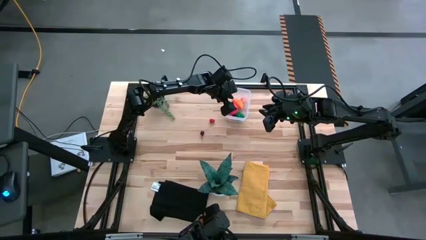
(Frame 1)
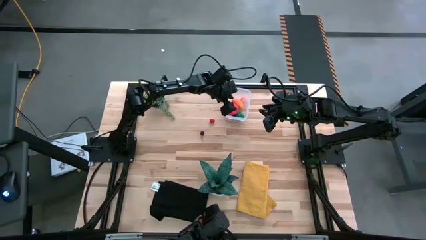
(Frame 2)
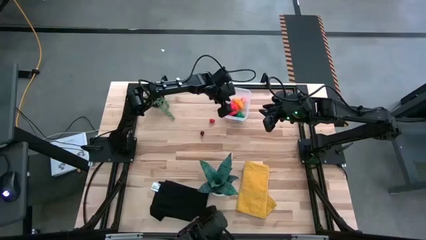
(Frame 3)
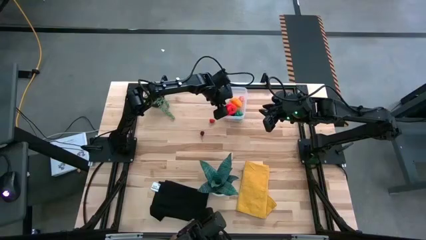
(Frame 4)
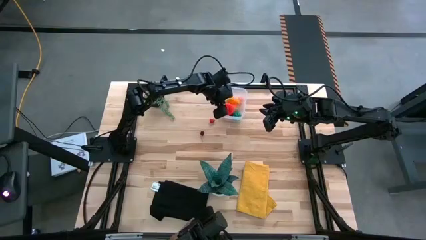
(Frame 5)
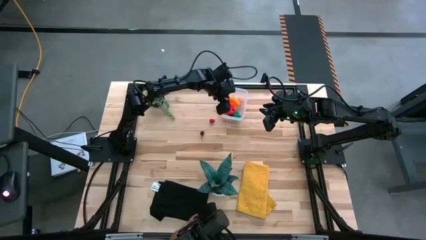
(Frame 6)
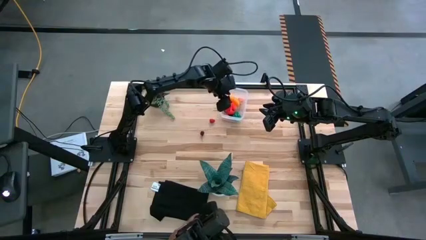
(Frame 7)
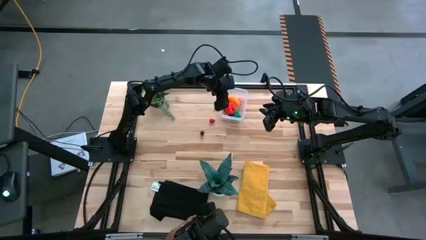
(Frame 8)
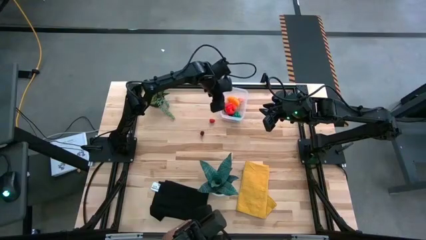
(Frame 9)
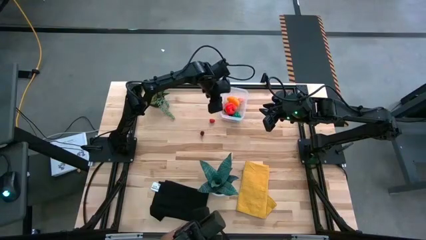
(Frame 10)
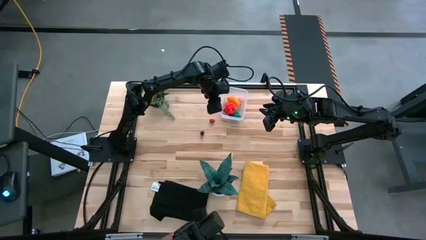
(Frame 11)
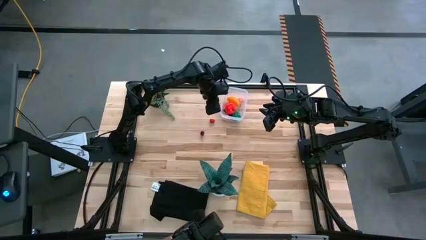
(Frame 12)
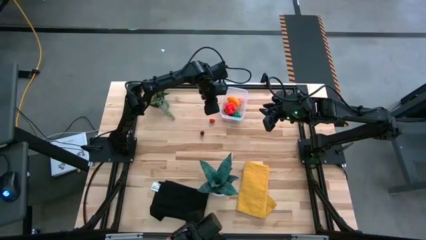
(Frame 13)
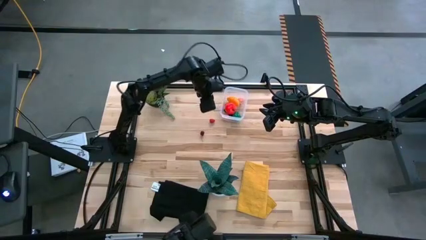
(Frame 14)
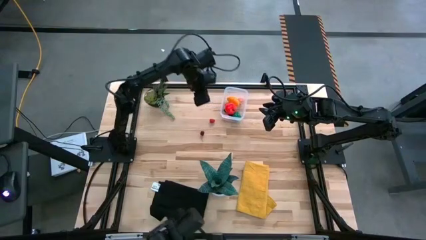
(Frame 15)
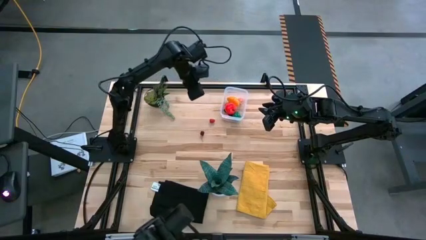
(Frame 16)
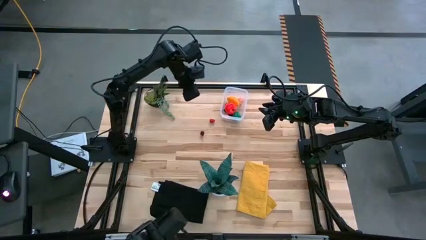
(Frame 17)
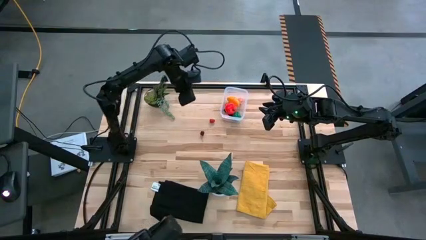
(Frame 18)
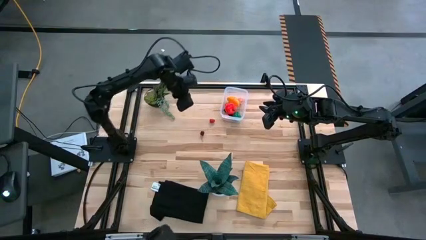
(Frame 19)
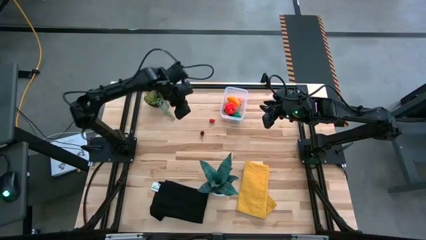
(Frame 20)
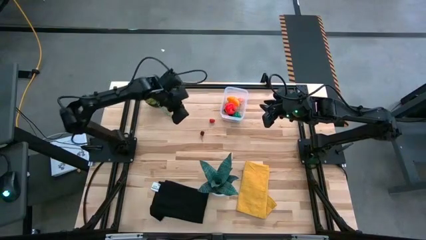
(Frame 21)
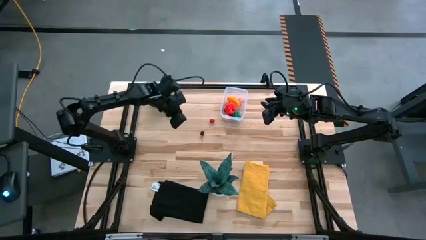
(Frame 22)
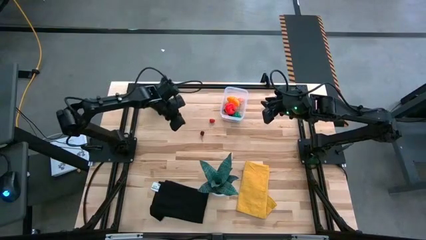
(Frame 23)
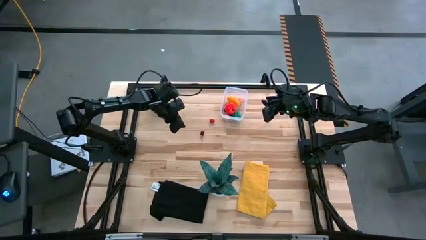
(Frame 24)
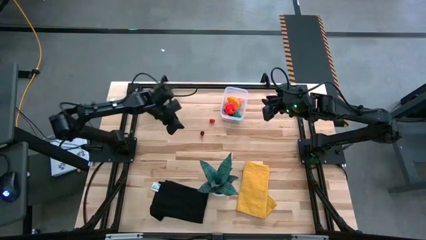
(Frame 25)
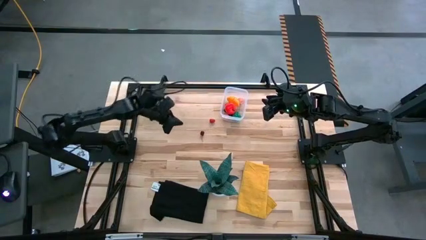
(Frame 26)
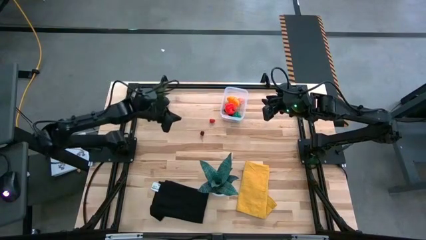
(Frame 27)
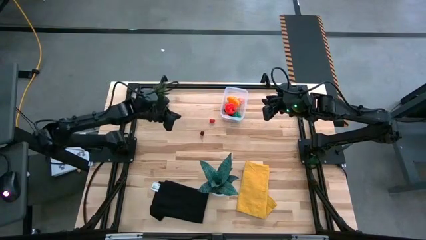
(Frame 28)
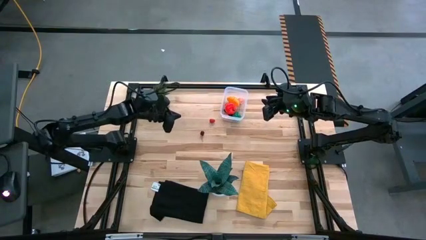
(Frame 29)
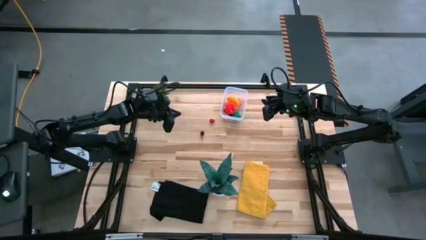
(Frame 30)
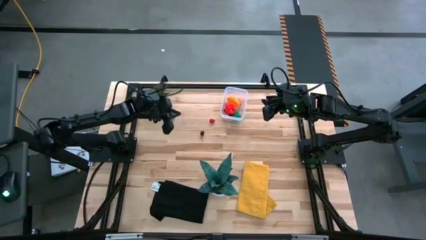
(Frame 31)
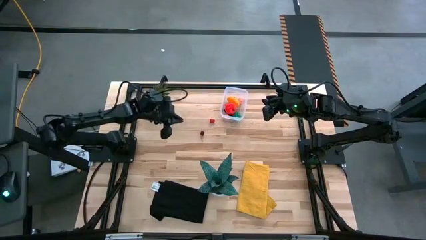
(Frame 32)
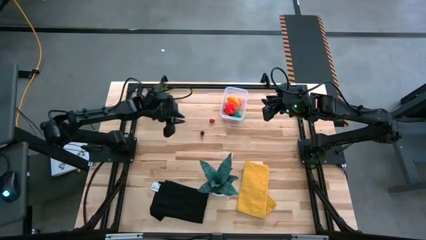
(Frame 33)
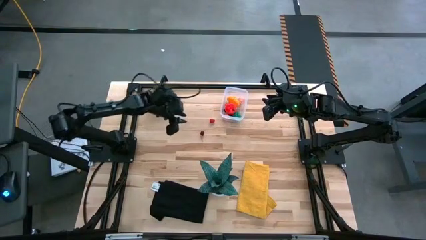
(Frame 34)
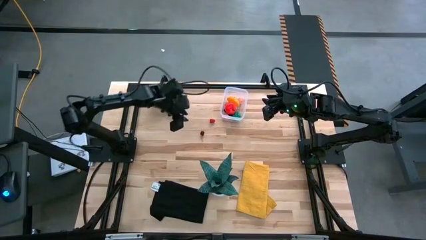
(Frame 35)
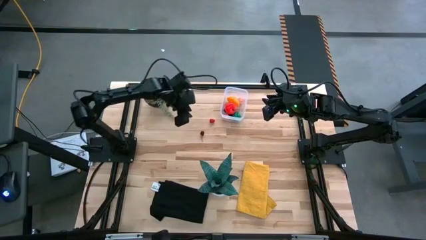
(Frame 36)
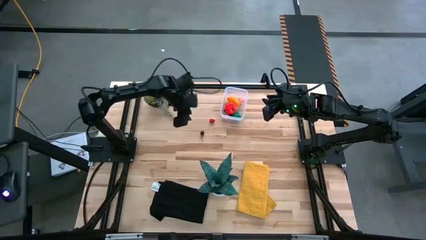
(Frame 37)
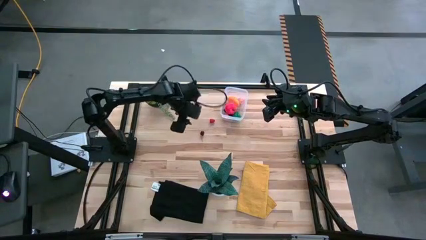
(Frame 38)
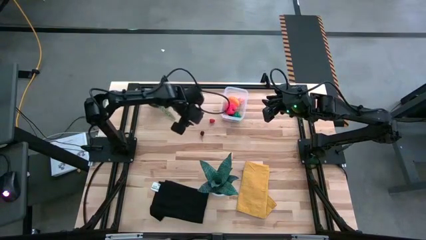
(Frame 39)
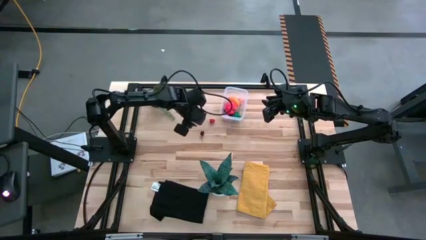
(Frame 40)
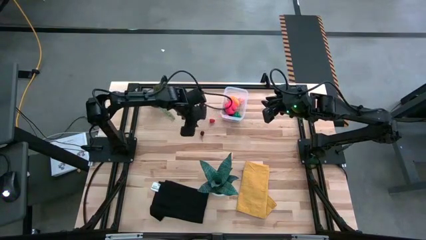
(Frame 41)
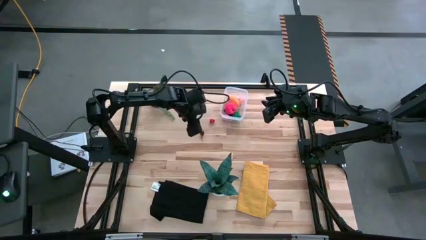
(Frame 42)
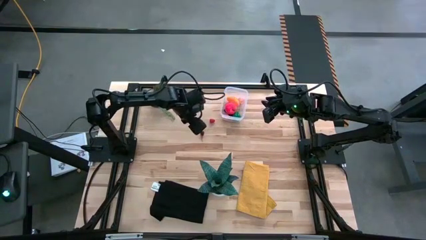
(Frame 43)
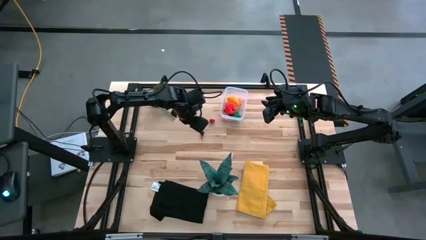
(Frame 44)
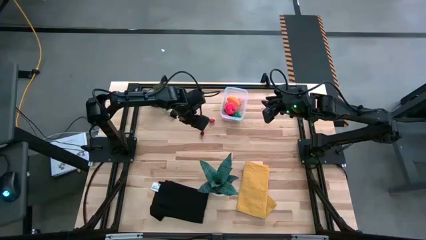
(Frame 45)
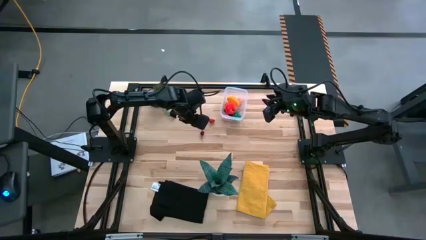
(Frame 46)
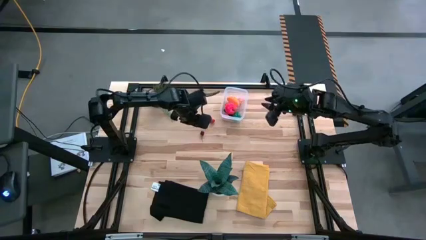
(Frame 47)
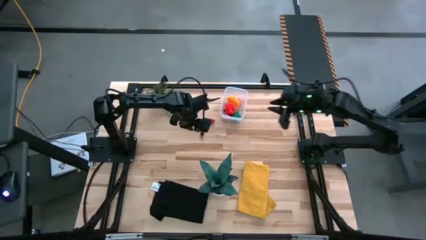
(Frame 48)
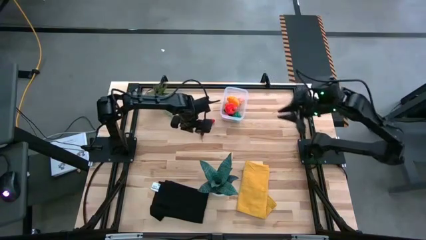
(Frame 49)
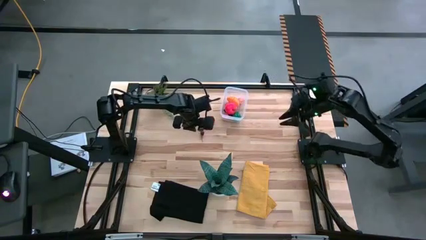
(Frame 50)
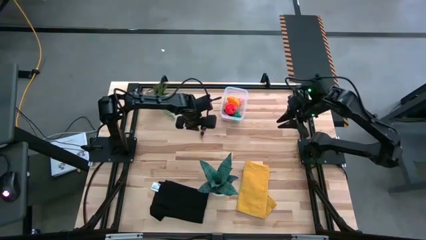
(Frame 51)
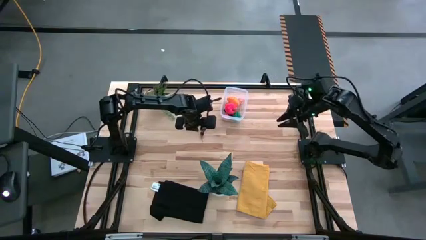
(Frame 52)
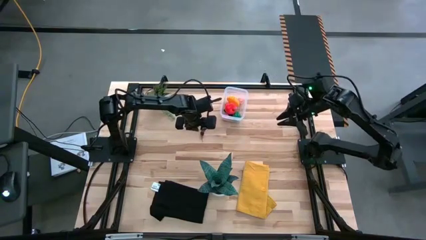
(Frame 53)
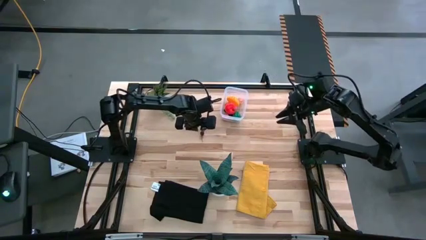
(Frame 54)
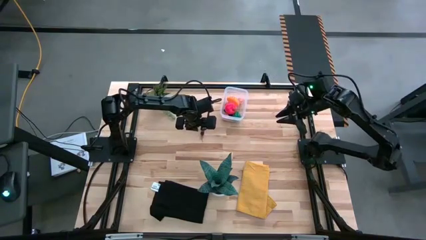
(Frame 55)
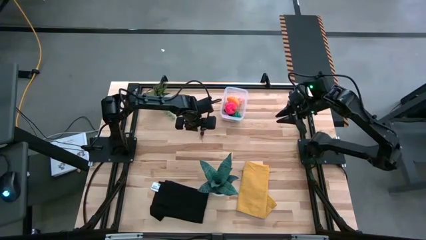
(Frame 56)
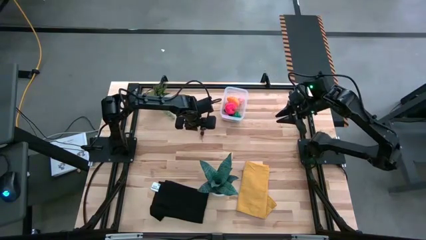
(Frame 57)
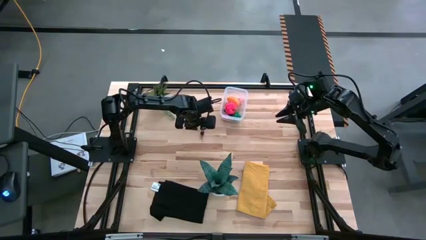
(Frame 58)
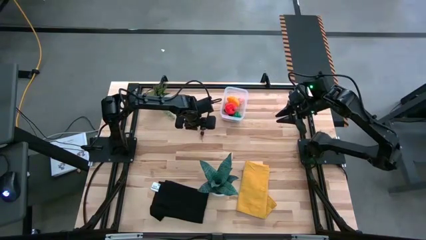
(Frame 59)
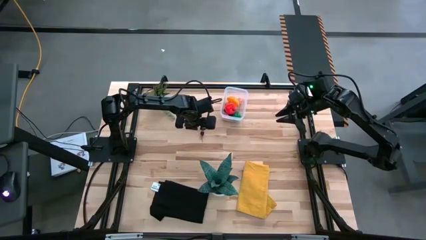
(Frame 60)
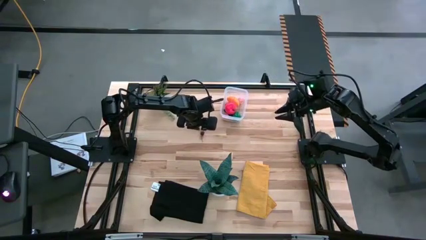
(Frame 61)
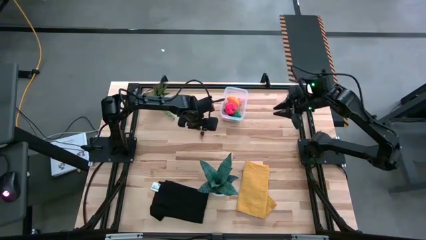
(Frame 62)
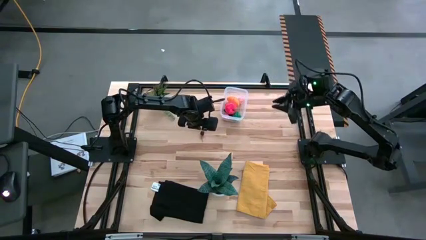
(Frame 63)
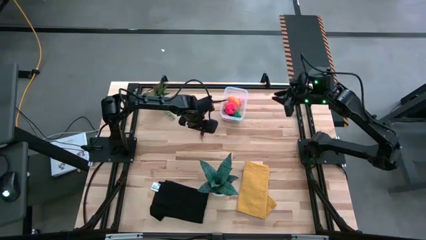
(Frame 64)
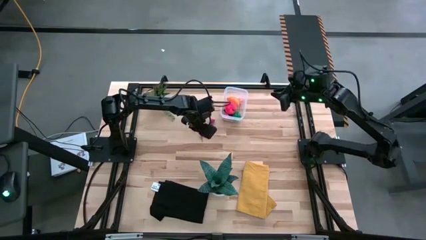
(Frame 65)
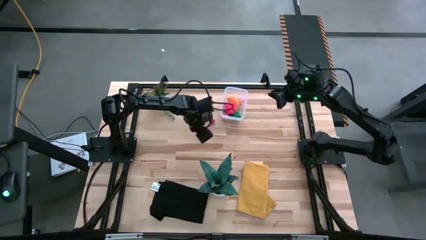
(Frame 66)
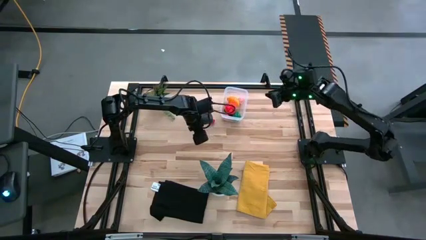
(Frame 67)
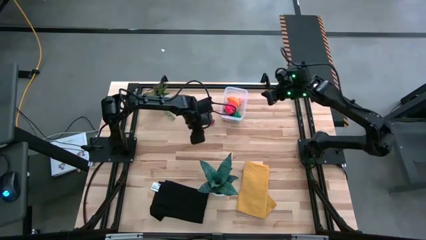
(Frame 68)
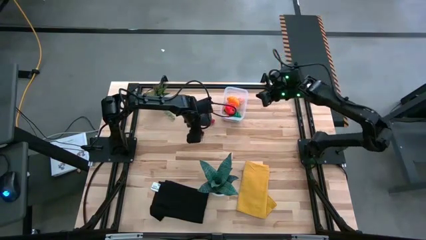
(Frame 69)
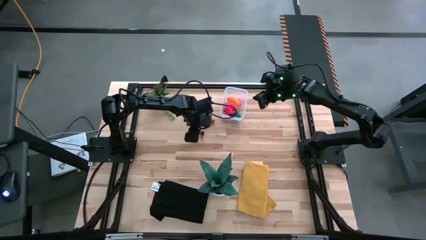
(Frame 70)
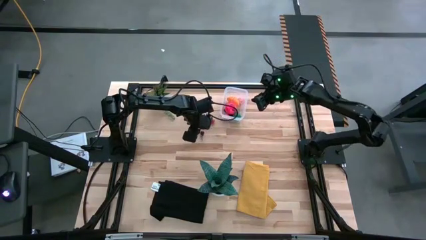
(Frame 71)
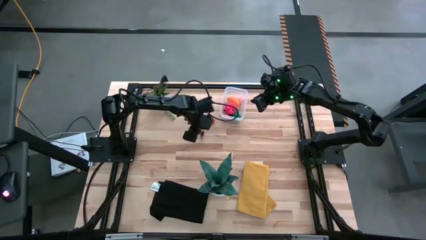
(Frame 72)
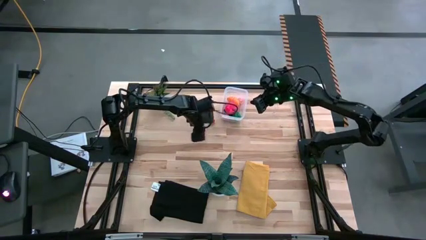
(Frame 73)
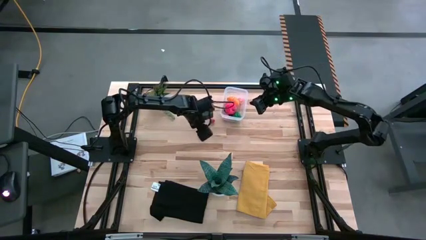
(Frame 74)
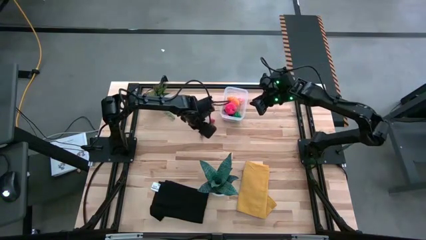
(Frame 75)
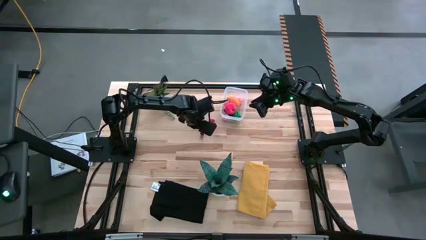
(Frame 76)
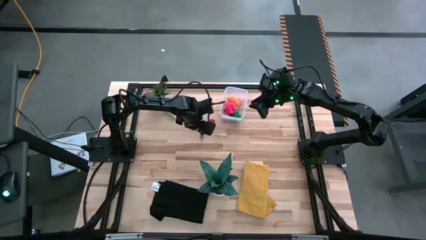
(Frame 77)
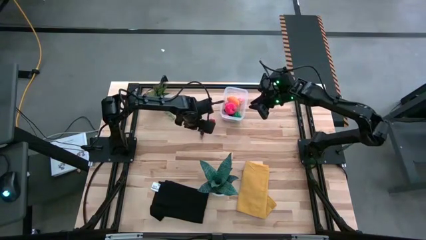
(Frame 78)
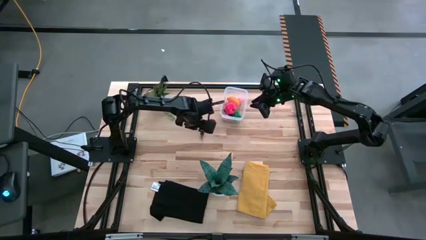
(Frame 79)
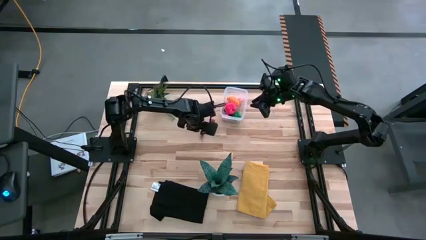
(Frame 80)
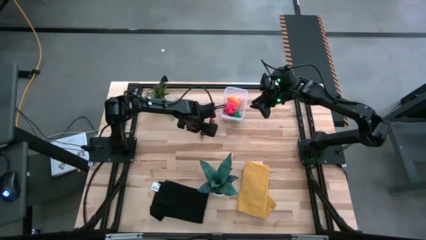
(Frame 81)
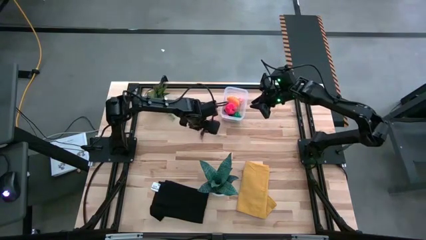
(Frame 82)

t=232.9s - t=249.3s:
Task: Pick and placing Produce into tupperware
Put the red cherry into the transparent container

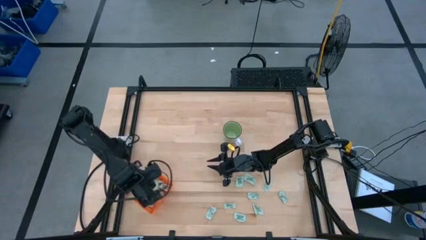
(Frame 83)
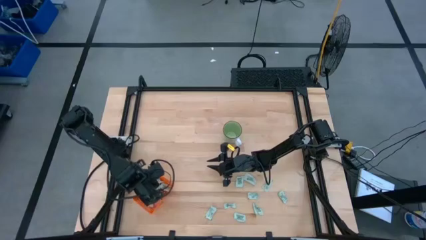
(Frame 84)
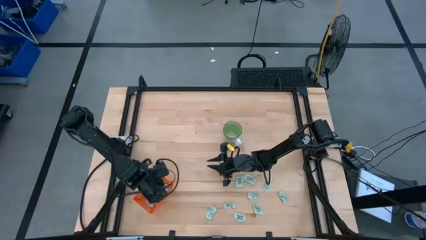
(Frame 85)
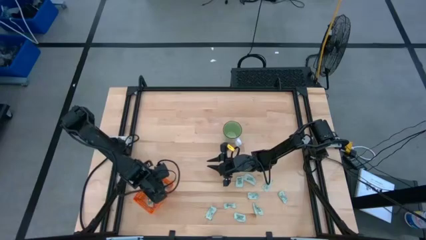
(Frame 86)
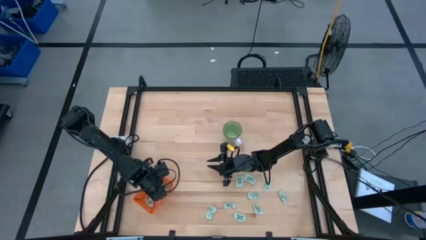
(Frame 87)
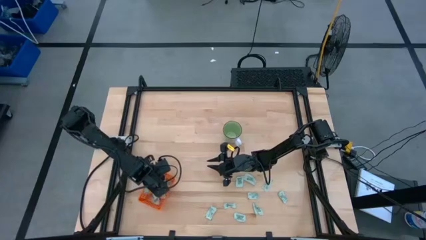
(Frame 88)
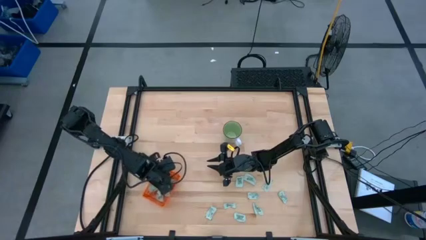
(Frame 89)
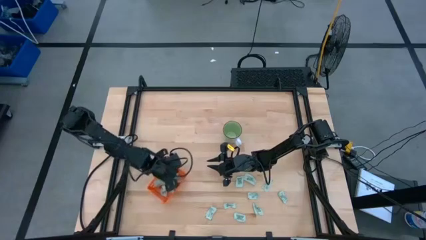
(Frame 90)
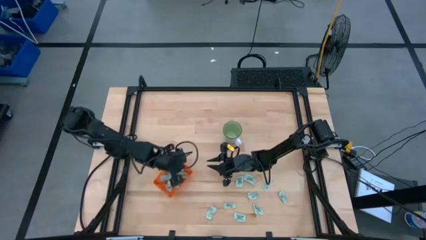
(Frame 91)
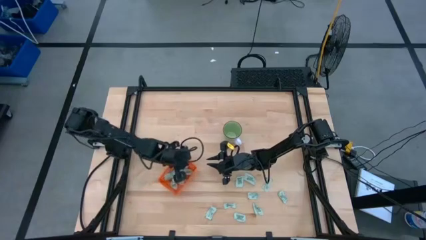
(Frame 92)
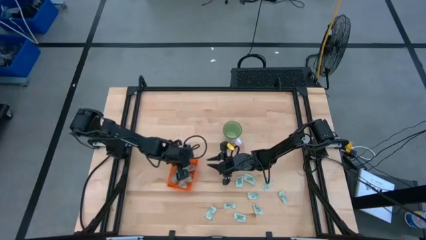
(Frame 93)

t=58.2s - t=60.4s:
Task: Pick and place Stevia / Truvia into bins
Adjust the orange basket on the table
